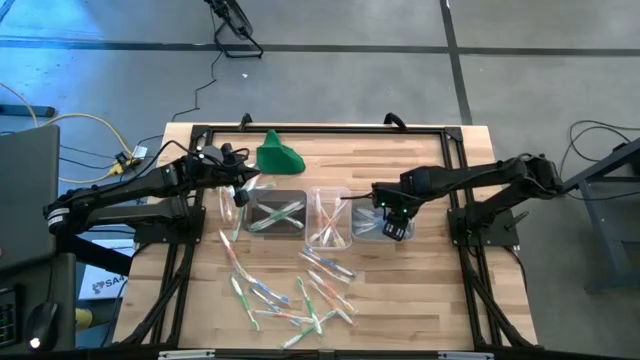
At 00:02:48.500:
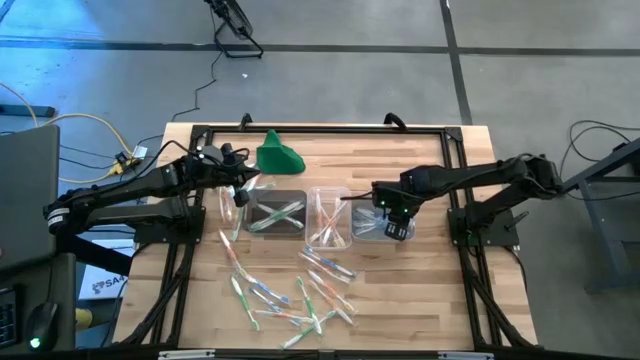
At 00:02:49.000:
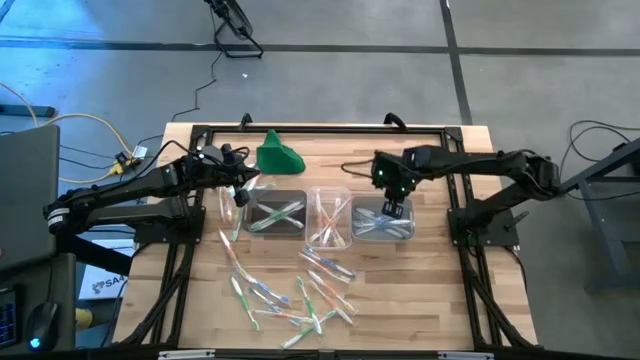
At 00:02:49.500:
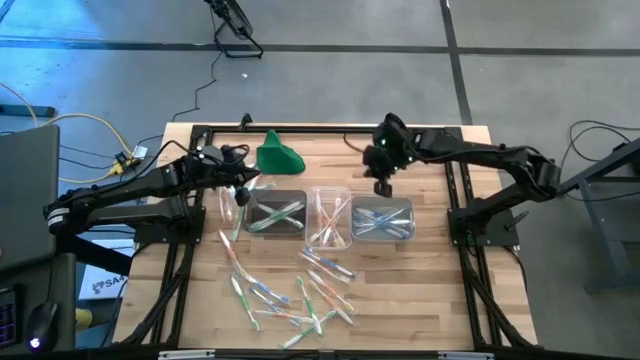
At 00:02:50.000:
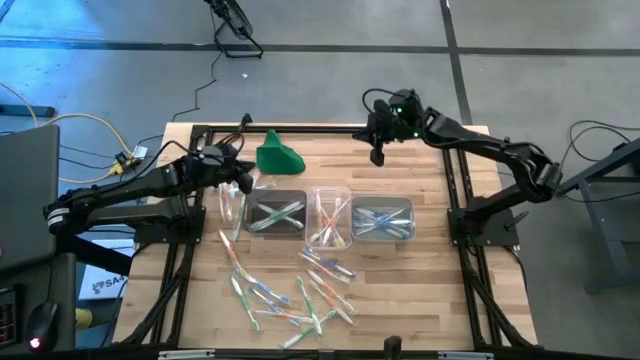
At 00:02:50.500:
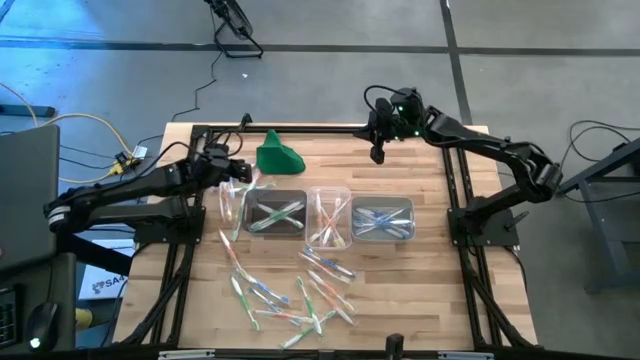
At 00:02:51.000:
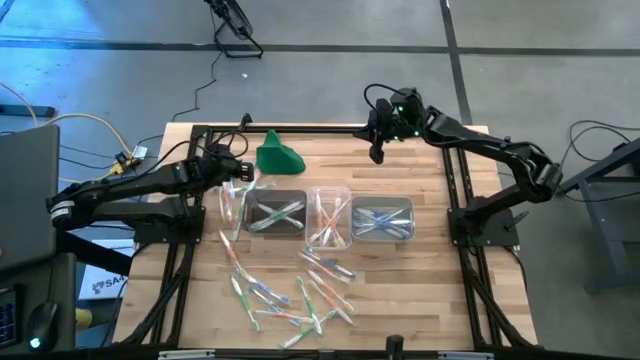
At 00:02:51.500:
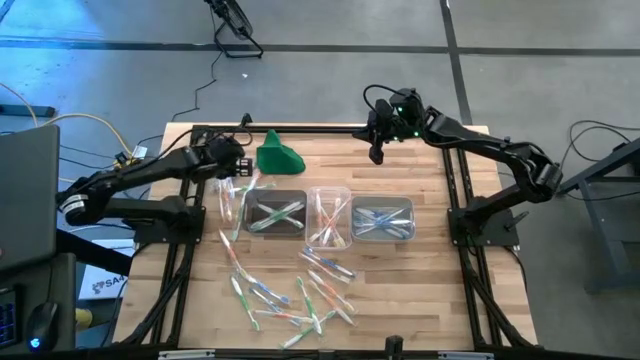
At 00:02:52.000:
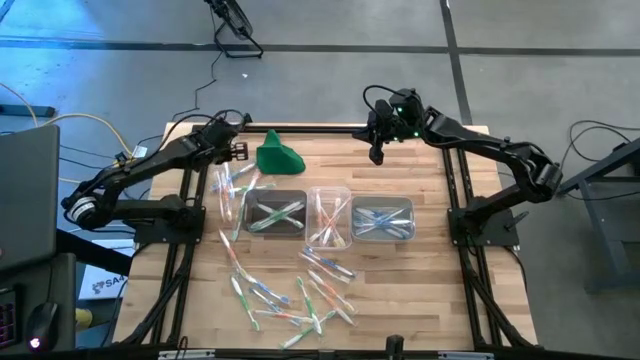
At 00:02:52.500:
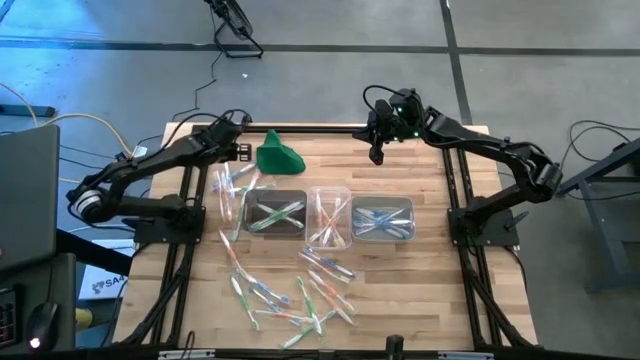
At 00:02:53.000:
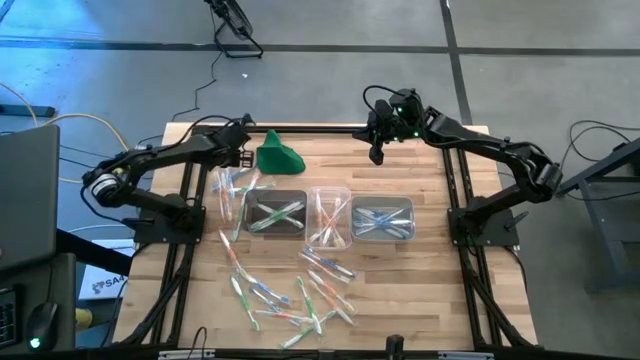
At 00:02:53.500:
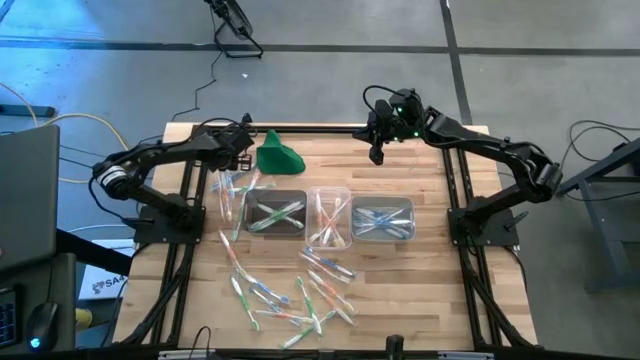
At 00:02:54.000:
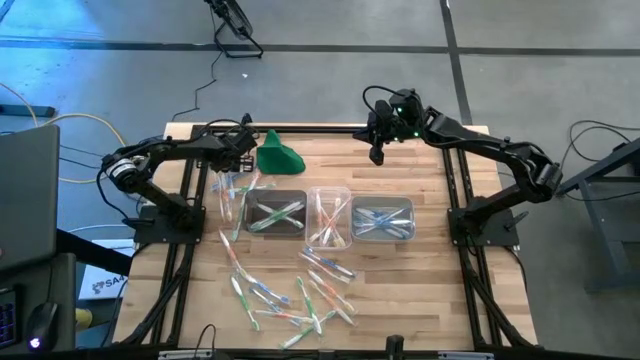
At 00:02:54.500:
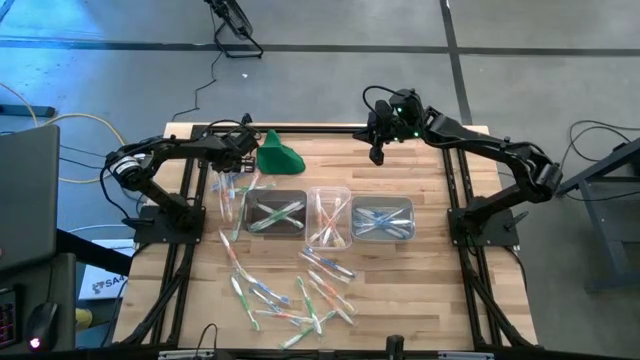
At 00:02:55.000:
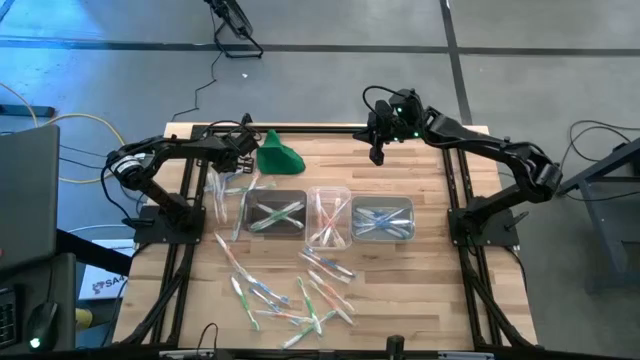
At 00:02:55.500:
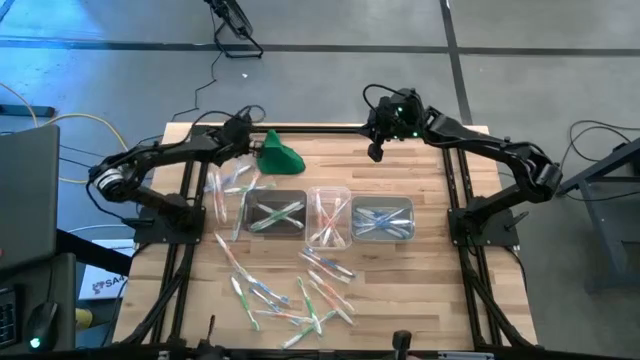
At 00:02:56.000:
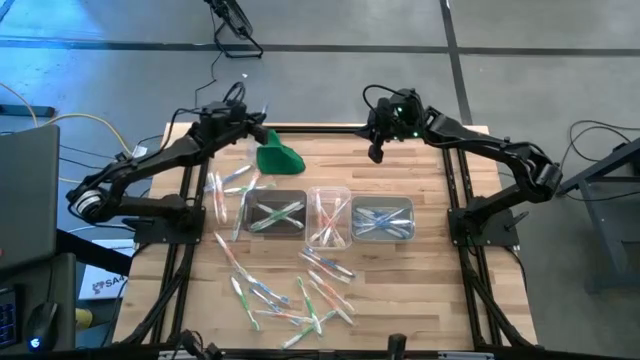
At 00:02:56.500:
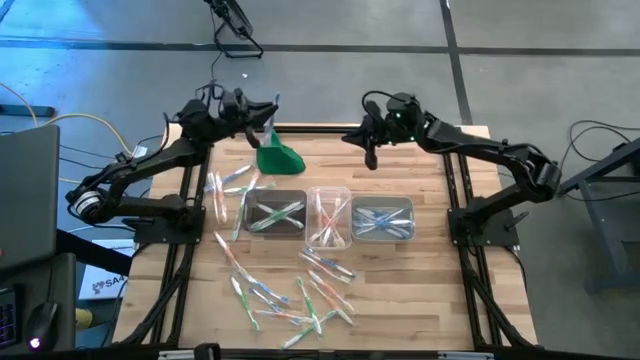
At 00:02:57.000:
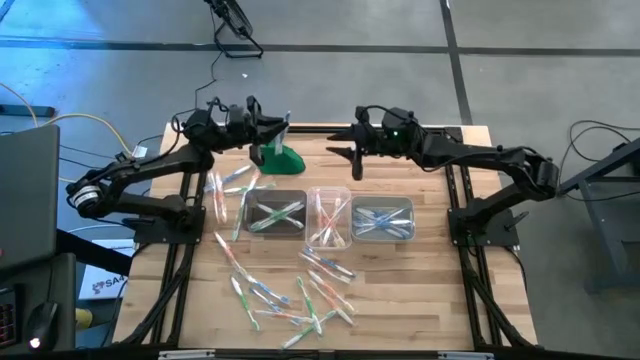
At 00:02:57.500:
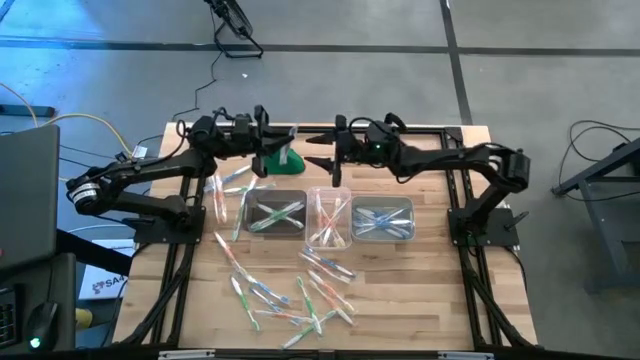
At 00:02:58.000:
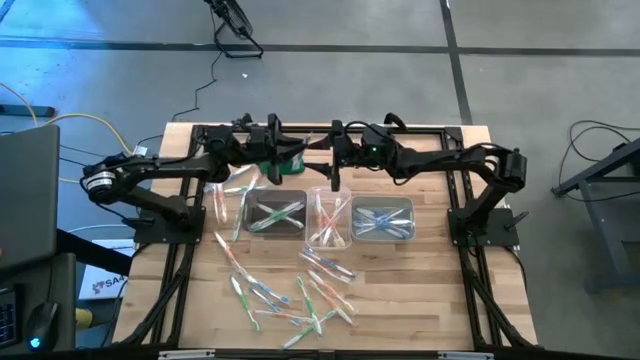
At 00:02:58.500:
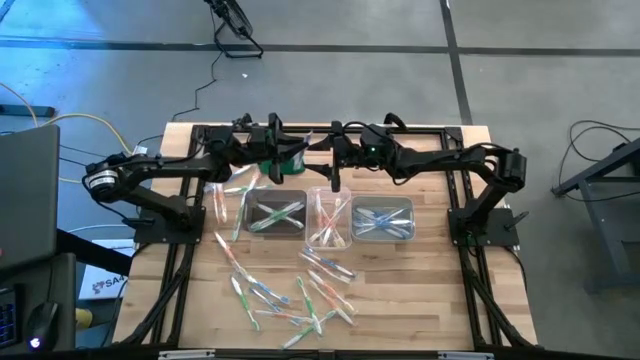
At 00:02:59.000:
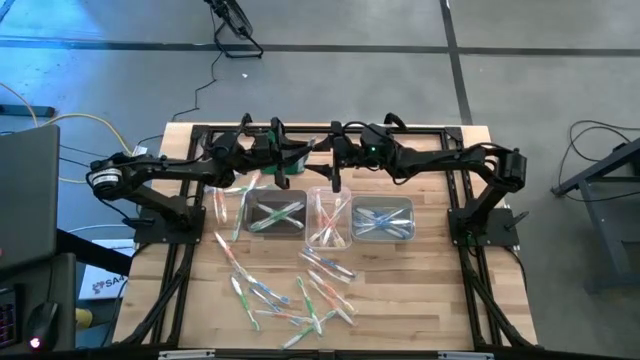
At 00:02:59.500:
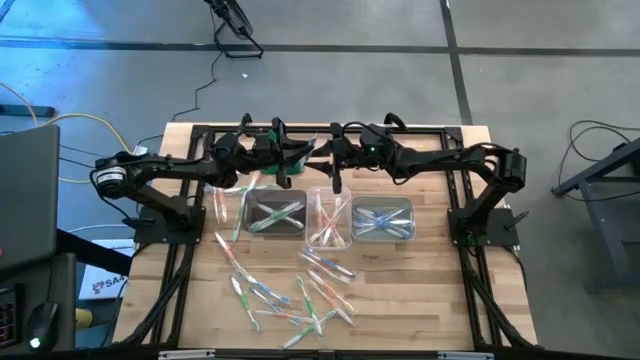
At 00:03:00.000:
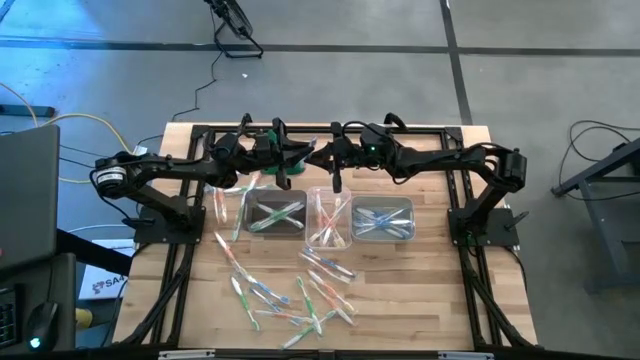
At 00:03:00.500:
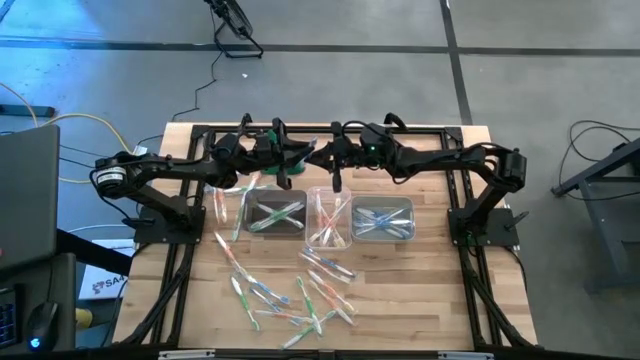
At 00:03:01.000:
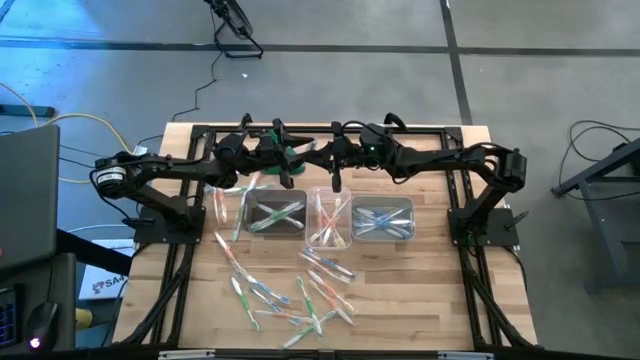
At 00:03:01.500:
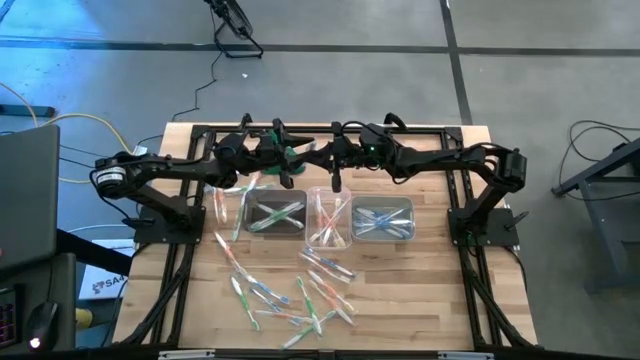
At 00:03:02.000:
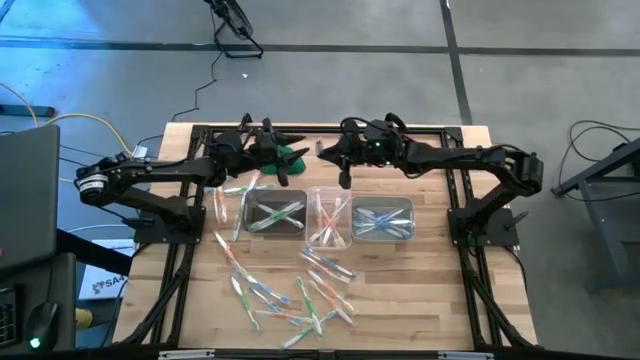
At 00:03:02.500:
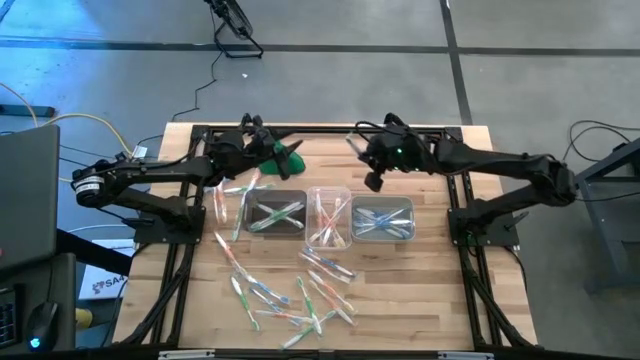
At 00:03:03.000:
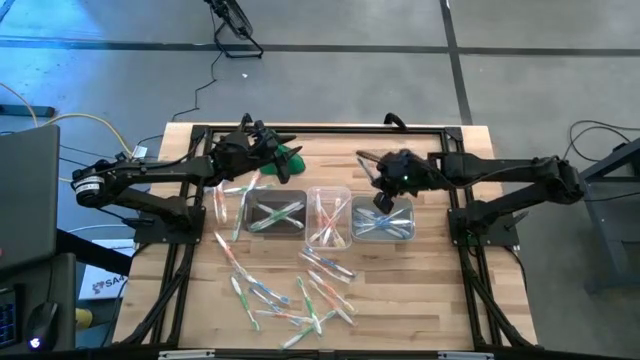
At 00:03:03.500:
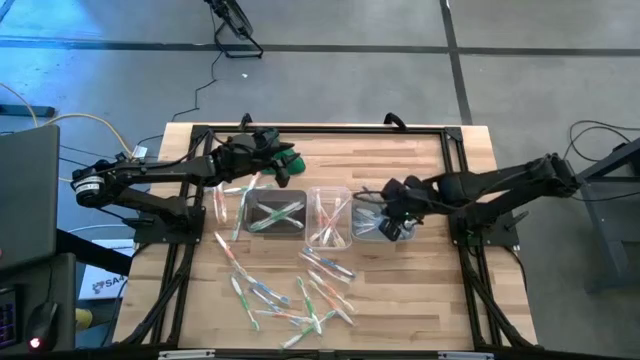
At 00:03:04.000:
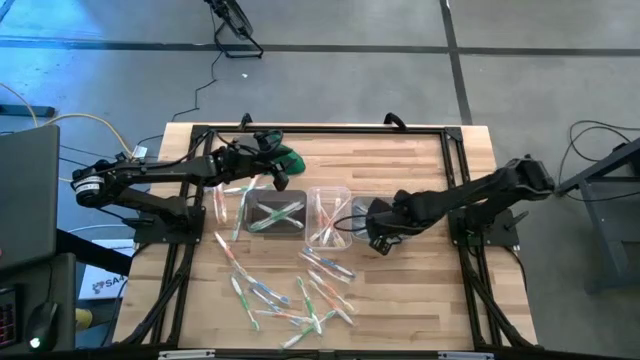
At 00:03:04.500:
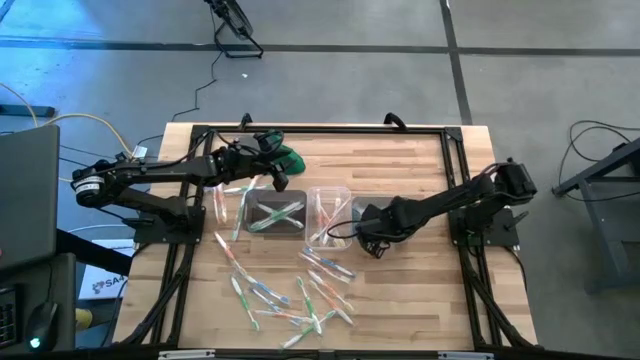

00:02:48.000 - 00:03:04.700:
Task: Pick & Place Toothbrushes
Put the blue toothbrush into the gray bin

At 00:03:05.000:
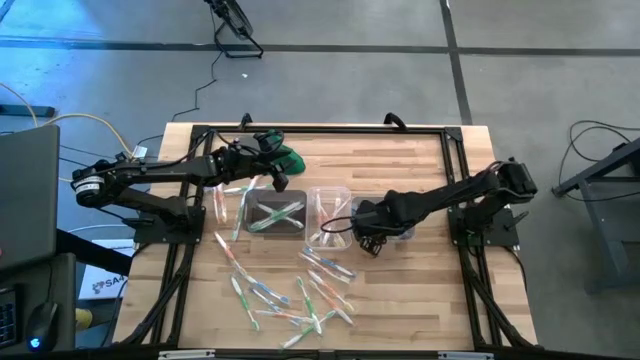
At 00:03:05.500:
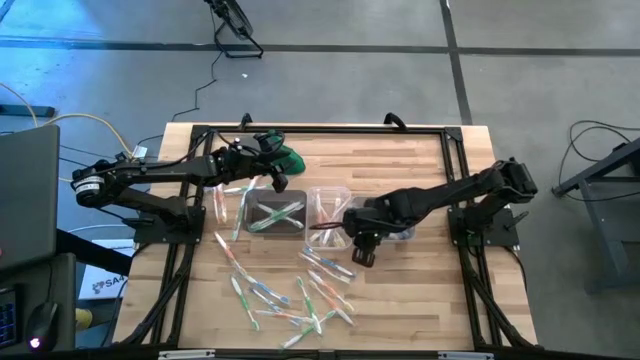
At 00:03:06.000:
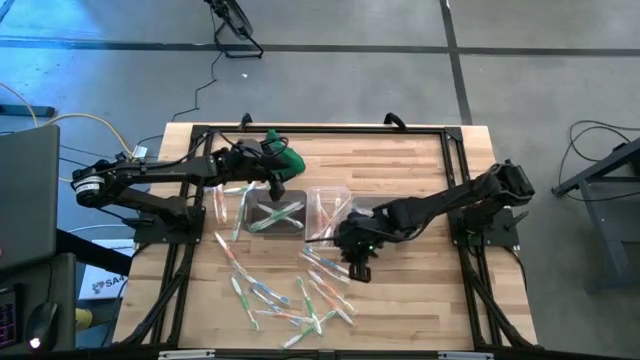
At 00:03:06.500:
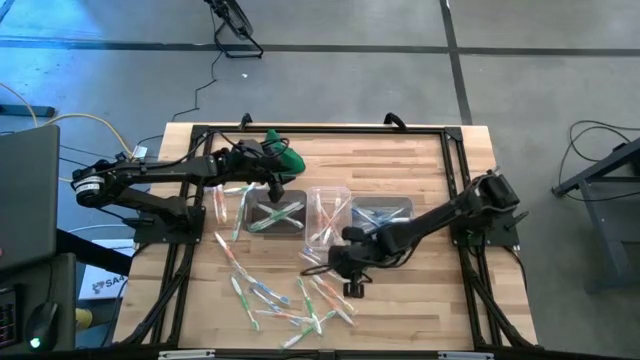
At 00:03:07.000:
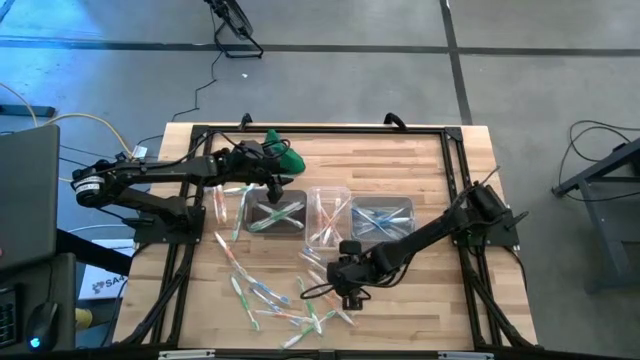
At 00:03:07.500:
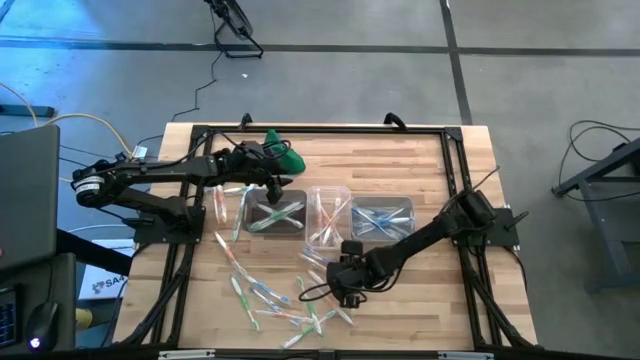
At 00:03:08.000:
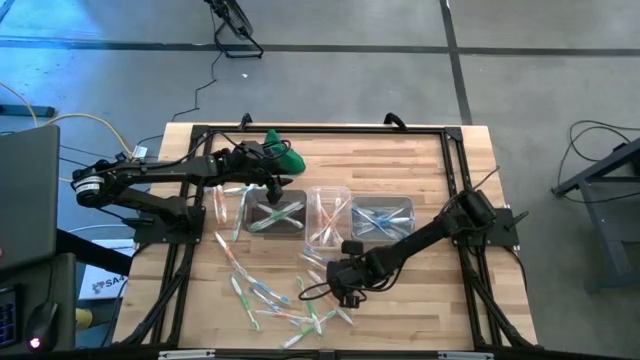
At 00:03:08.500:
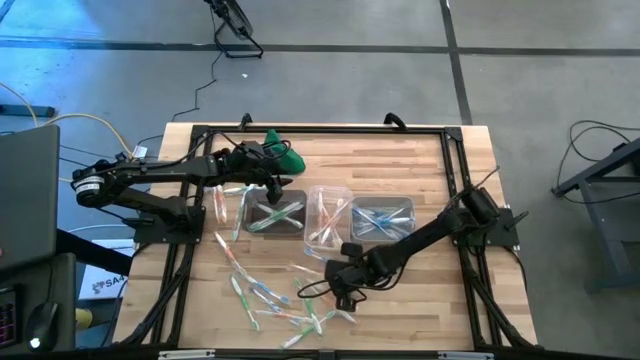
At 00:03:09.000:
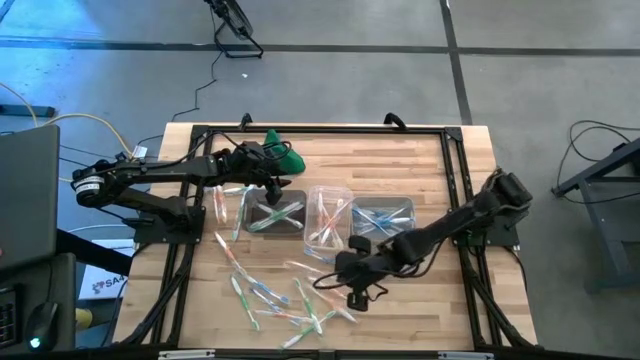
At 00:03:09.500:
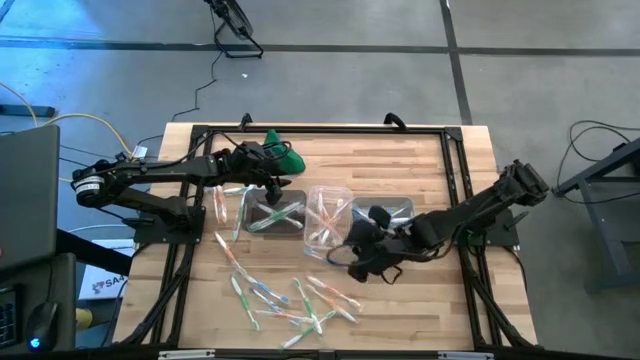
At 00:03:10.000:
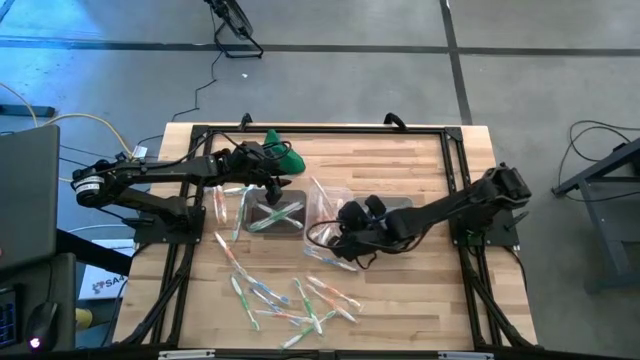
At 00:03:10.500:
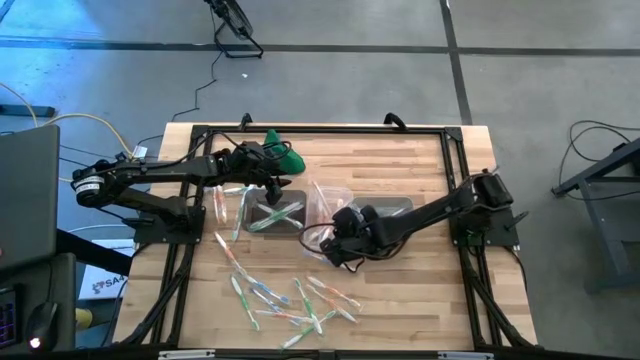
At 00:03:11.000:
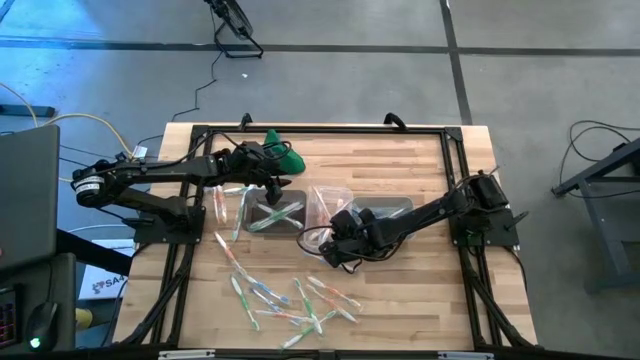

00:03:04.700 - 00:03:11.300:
Put the orange toothbrush into the transparent bin
